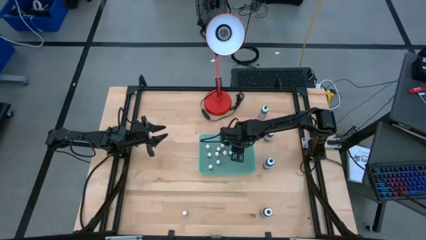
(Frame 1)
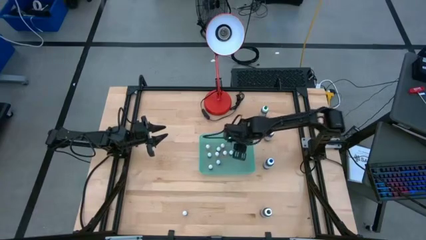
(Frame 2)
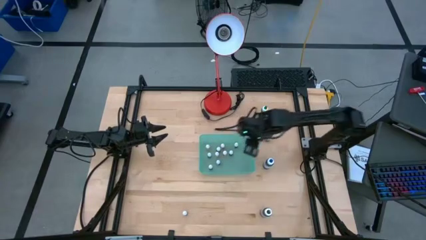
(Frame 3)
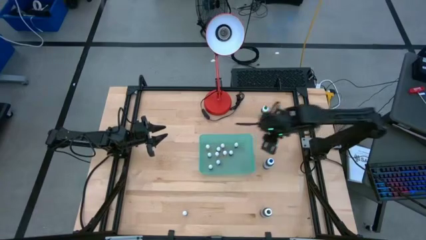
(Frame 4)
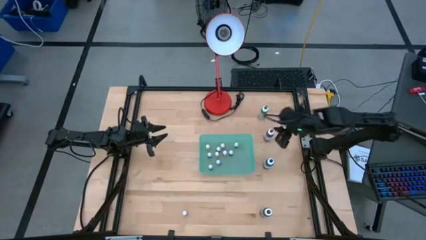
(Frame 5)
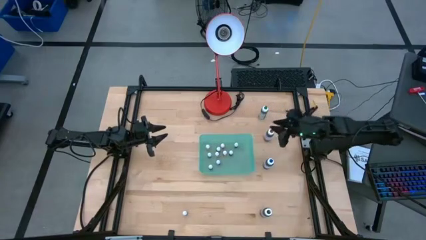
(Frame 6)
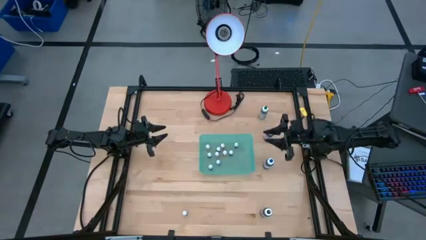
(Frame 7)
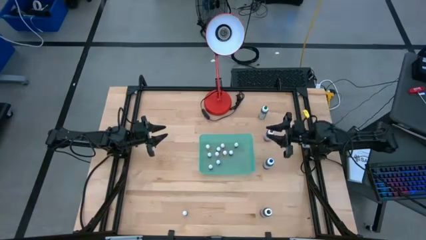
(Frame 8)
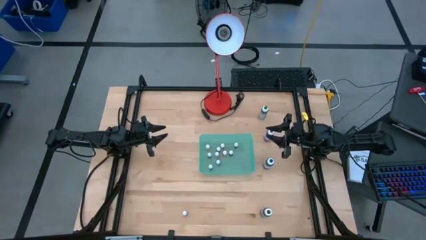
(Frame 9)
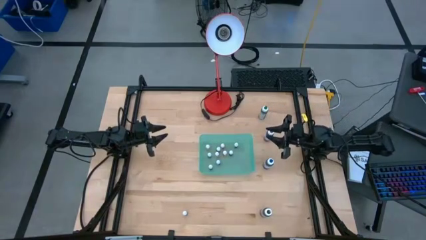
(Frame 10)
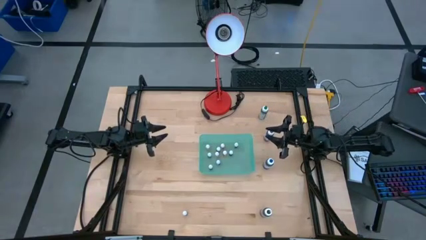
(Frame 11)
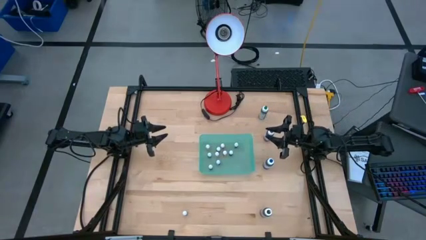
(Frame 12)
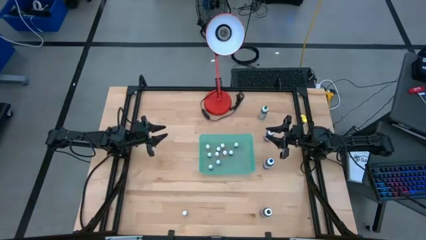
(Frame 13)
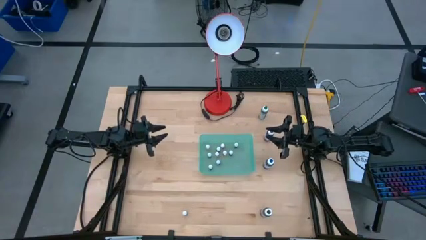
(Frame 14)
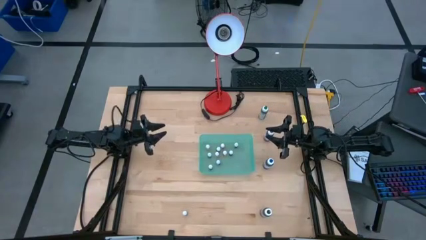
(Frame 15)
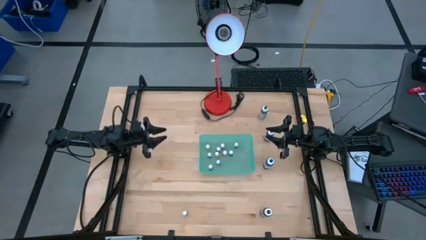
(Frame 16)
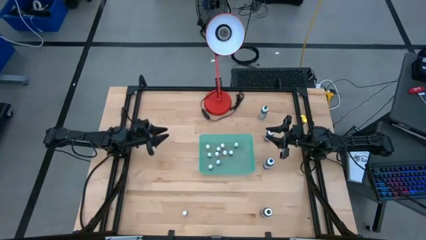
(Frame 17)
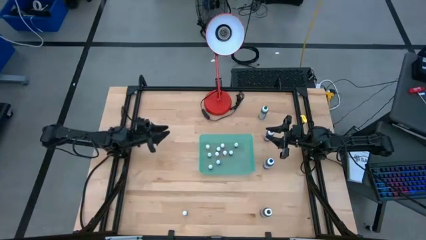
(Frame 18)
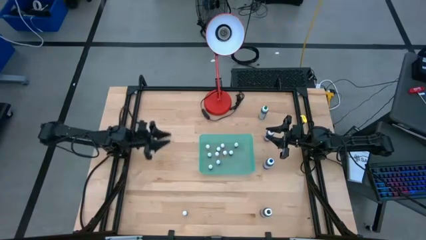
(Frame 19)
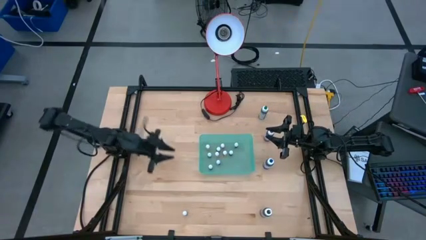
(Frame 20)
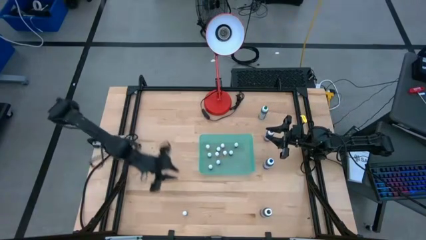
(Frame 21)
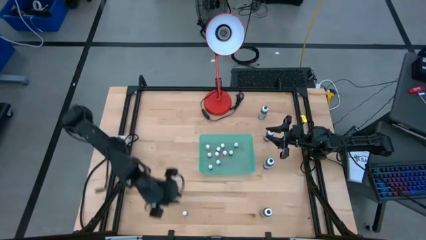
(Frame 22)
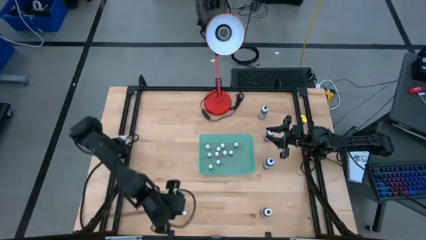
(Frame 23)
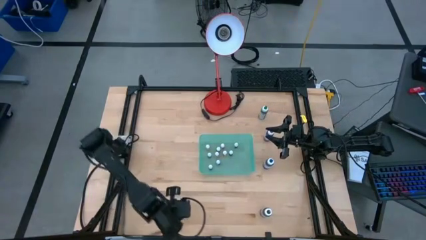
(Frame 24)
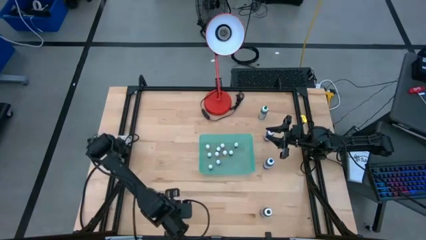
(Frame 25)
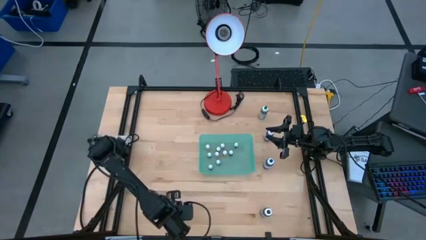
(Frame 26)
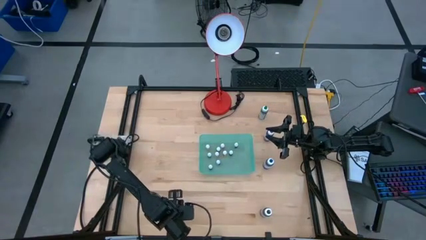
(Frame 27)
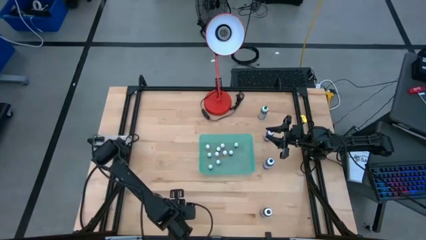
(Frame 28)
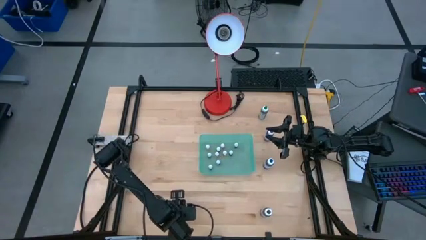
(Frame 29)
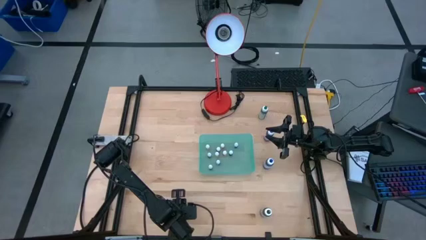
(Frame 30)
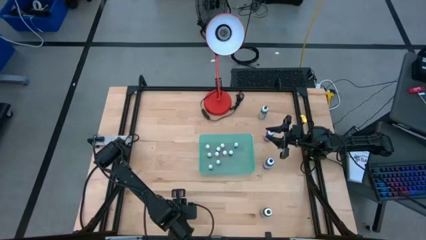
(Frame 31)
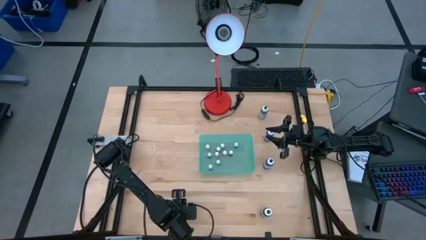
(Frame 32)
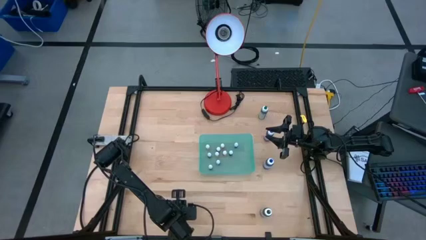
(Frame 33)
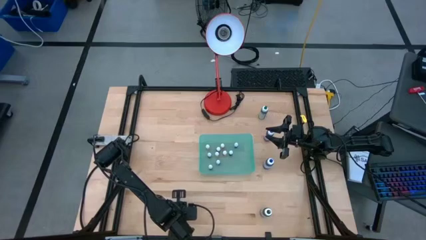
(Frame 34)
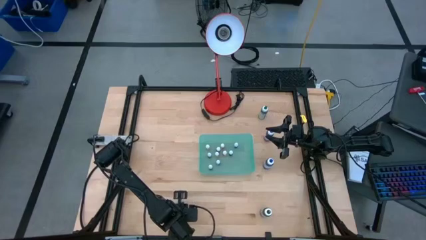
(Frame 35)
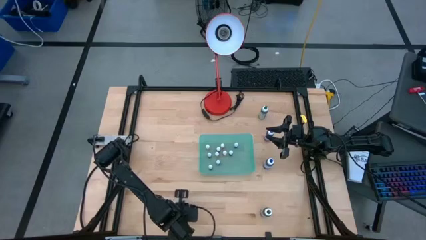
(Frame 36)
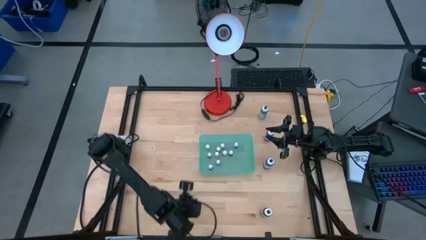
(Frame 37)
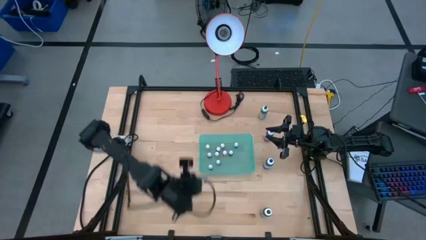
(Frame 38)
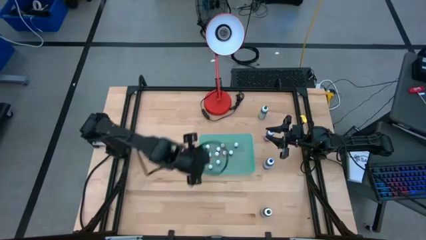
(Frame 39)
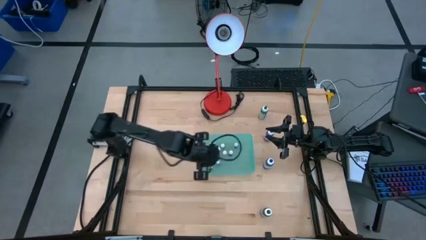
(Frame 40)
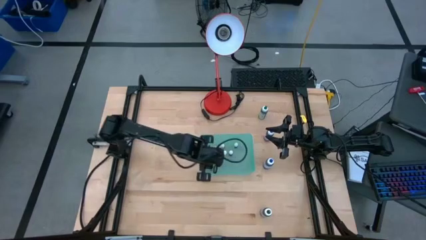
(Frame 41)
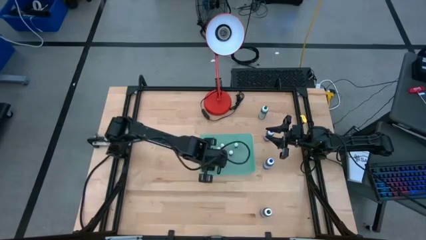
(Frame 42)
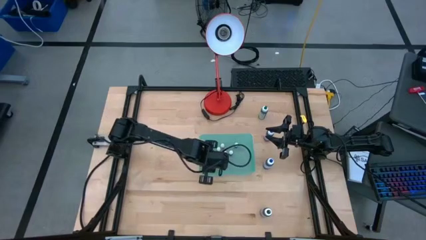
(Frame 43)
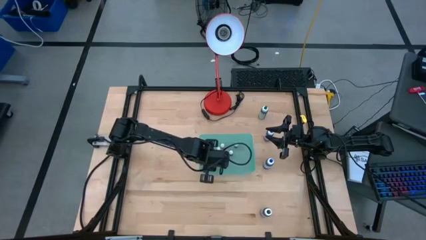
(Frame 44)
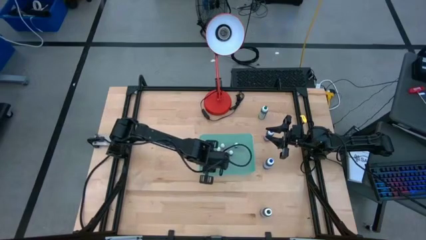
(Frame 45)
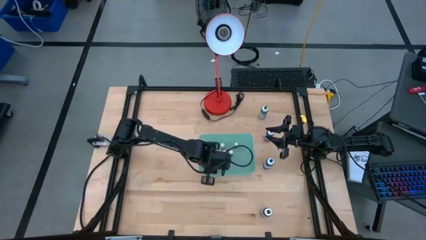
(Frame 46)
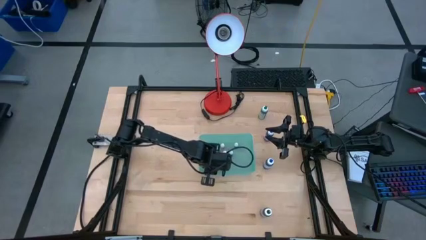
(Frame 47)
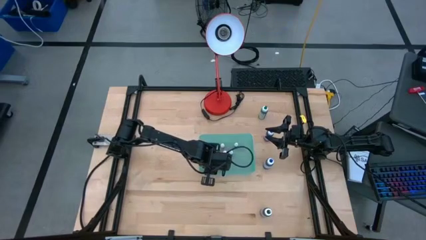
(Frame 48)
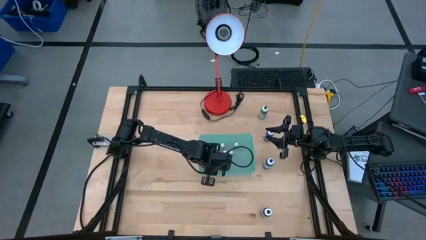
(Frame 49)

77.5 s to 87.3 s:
Task: Pick & Place food coloring
Put the small purple food coloring bottle into the green bin

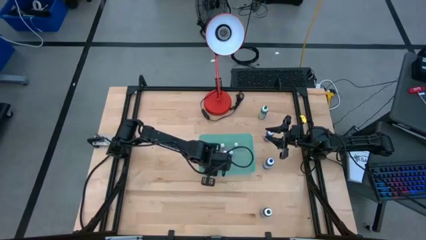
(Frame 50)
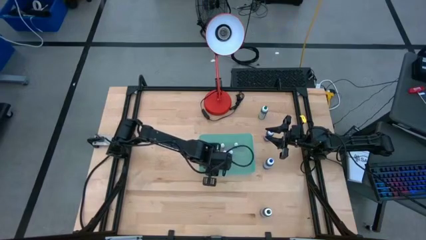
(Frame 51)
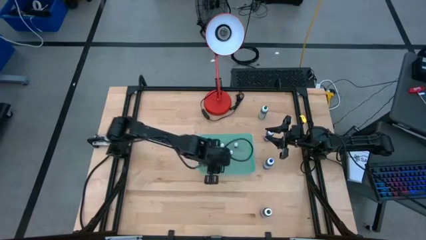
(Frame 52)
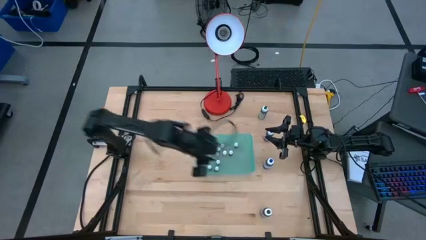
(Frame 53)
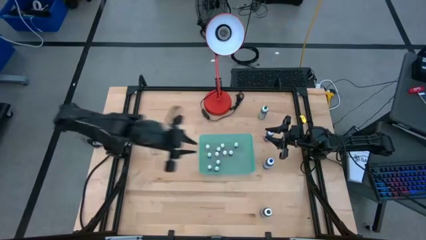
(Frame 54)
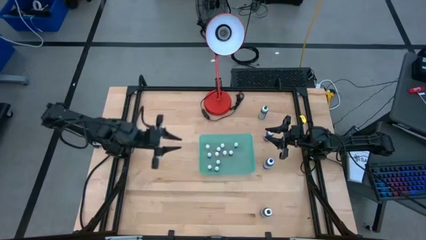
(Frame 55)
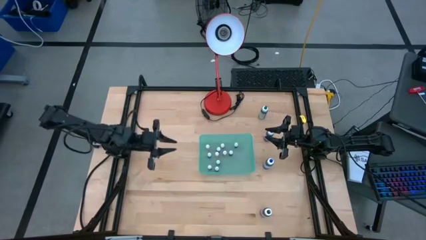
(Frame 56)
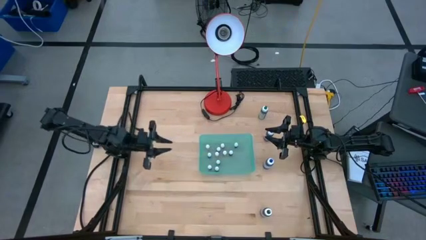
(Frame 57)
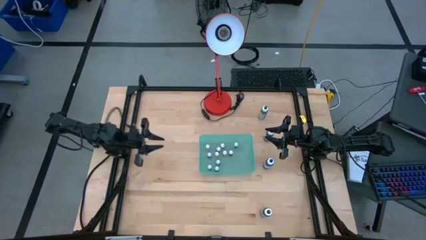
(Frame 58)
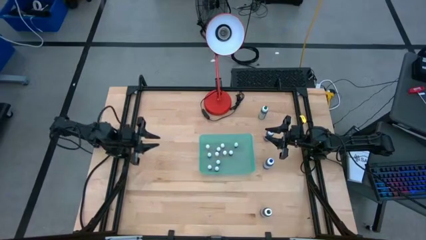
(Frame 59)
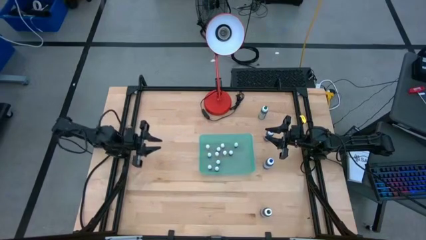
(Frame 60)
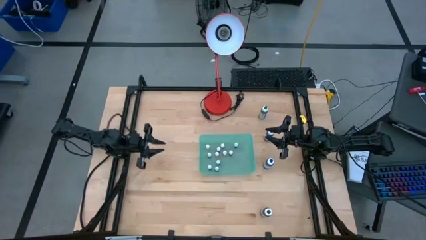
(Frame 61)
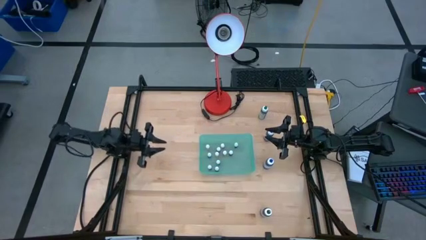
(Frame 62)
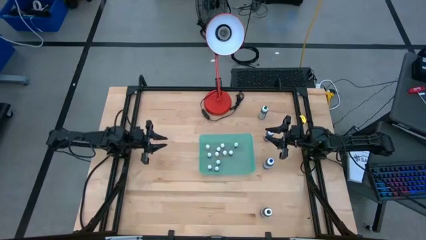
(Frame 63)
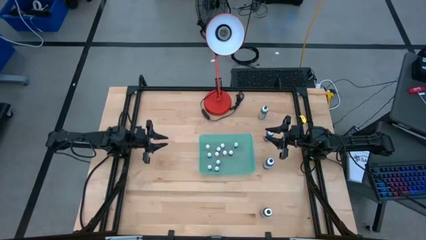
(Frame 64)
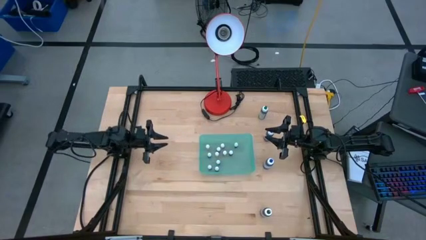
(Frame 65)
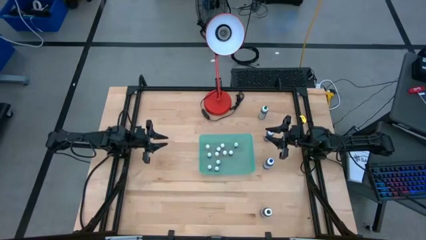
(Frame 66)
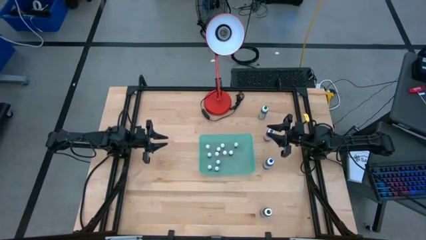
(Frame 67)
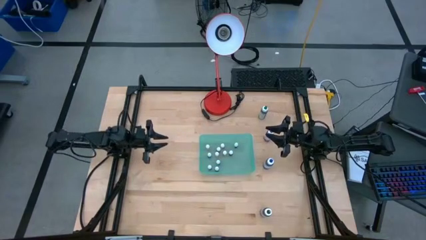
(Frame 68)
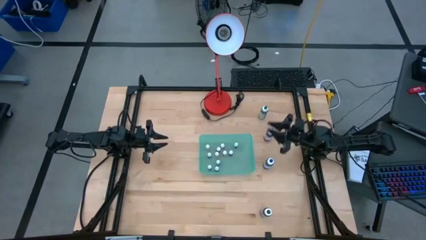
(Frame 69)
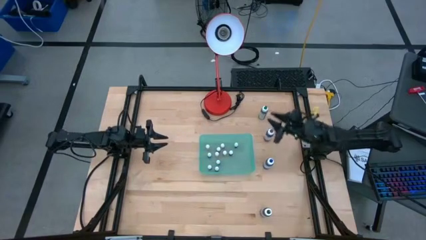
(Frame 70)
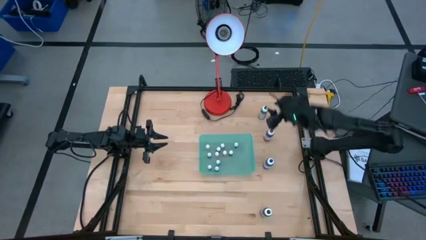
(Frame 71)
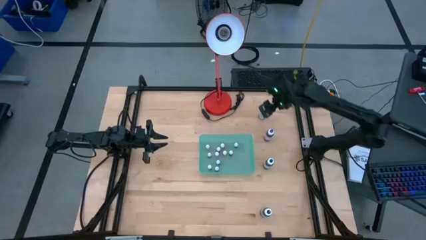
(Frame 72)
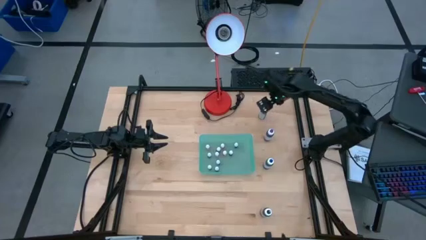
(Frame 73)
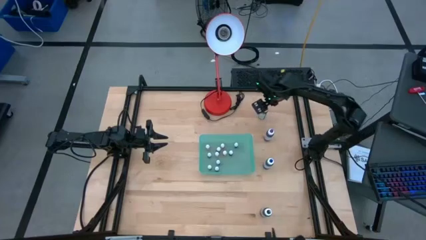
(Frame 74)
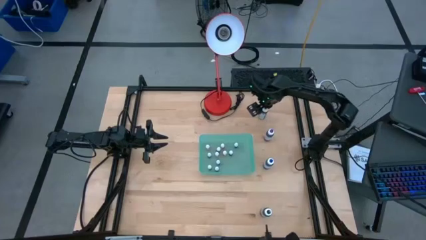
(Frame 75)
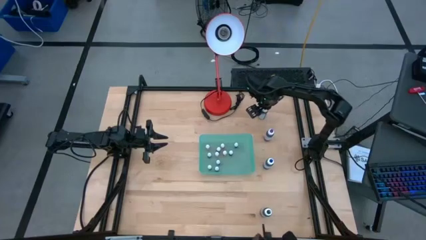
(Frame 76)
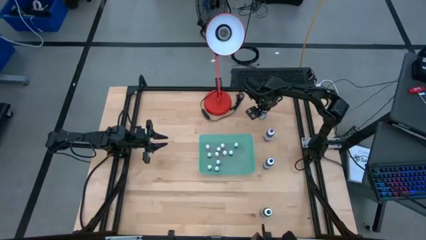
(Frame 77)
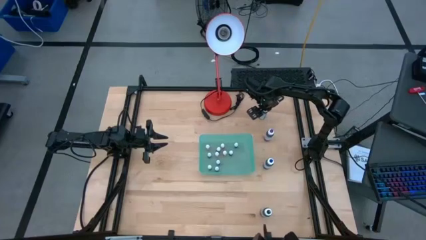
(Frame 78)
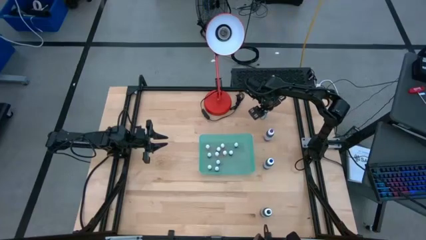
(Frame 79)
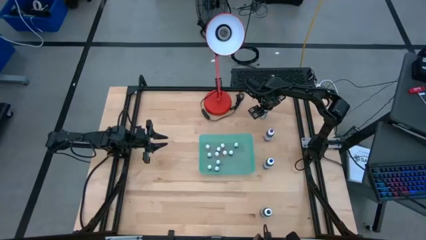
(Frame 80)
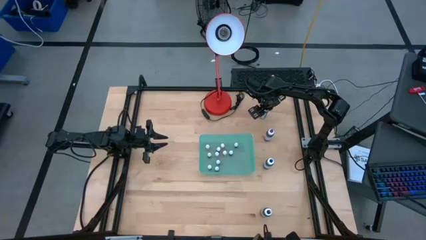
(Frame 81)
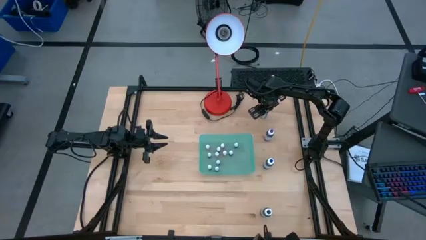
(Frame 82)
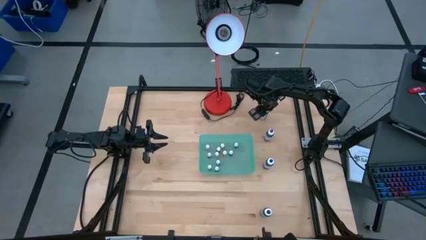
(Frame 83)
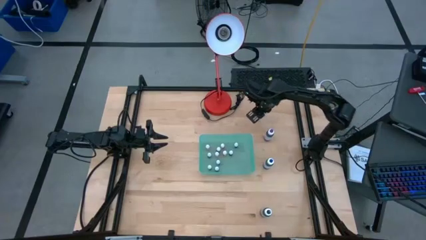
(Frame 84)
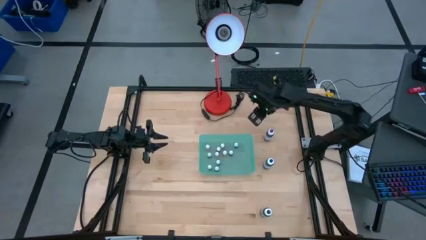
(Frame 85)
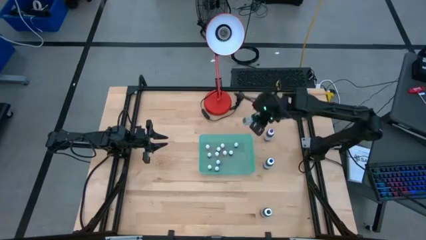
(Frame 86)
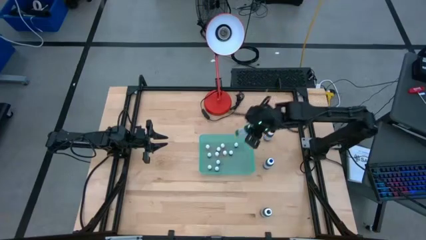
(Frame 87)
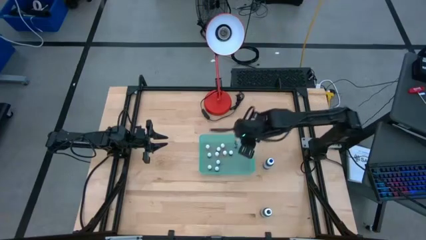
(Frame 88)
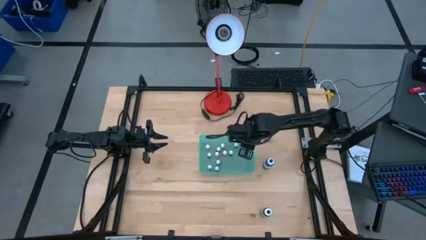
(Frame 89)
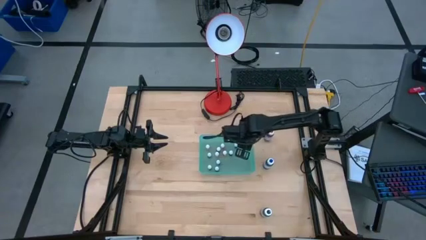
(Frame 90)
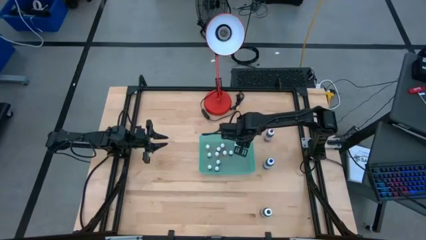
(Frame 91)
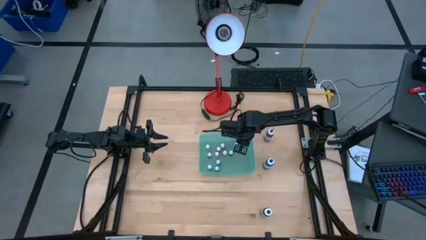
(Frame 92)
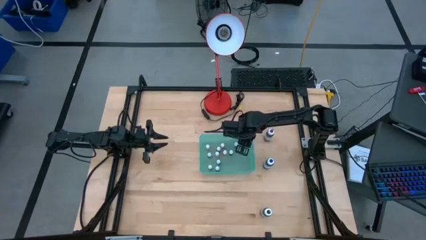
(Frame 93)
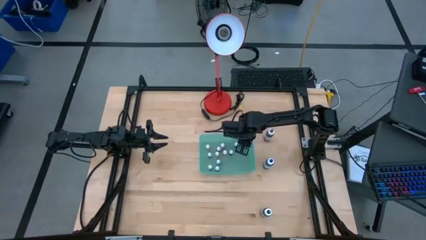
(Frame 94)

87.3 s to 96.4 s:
Put the big green food coloring bottle into the green bin
